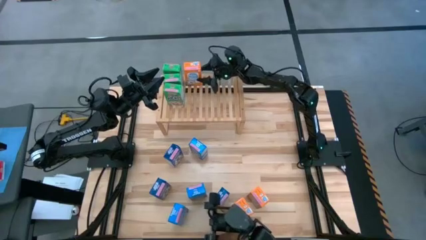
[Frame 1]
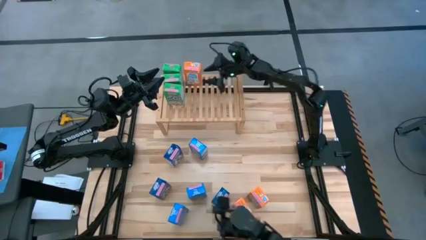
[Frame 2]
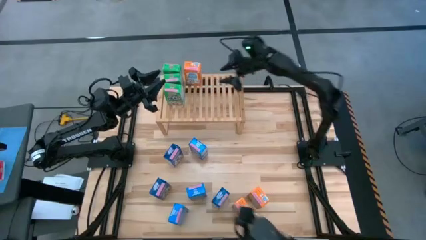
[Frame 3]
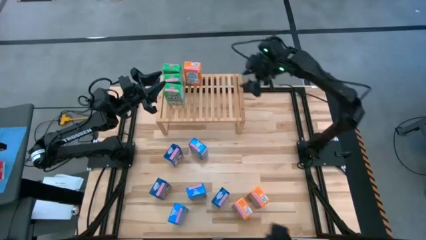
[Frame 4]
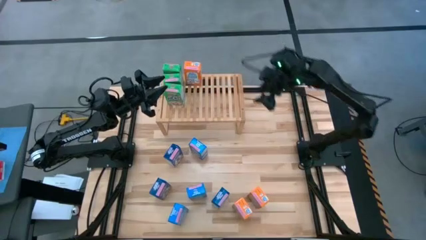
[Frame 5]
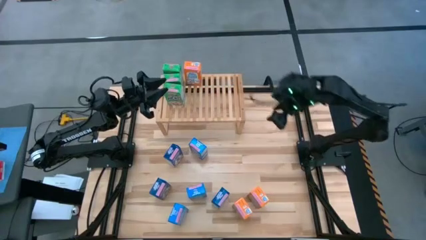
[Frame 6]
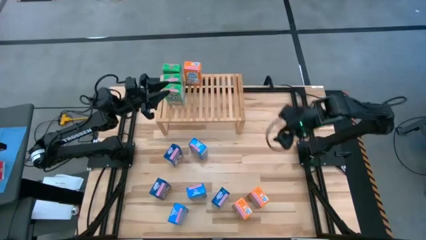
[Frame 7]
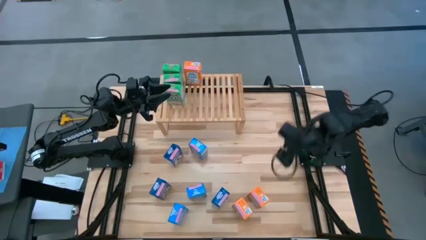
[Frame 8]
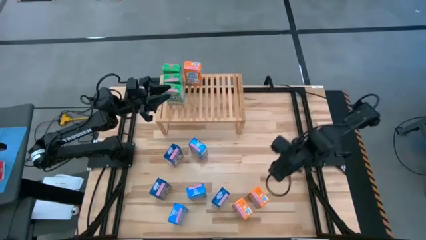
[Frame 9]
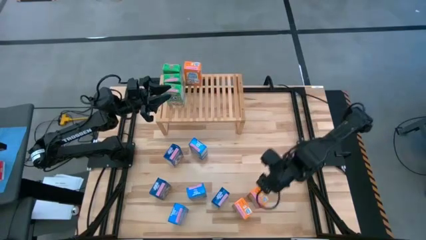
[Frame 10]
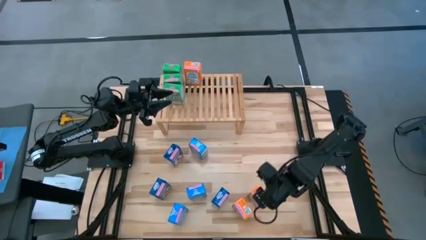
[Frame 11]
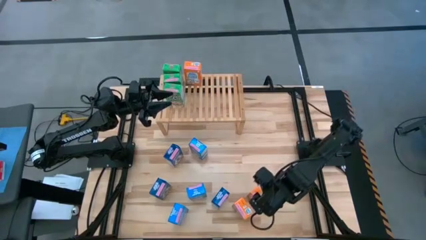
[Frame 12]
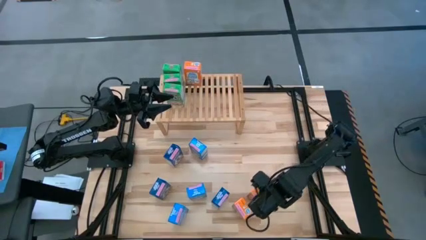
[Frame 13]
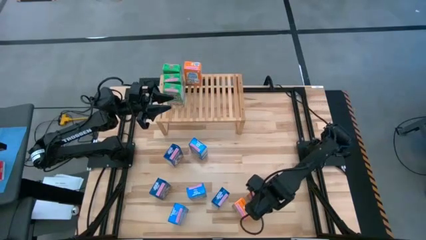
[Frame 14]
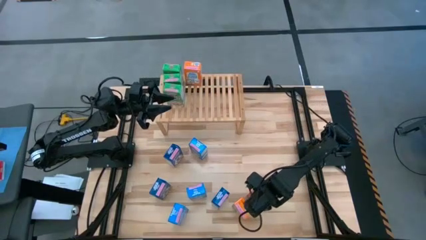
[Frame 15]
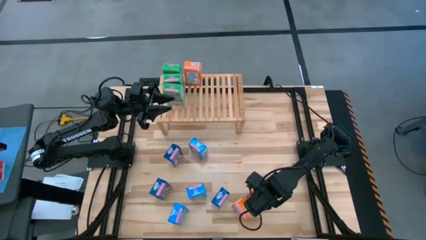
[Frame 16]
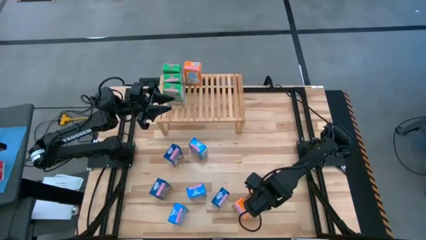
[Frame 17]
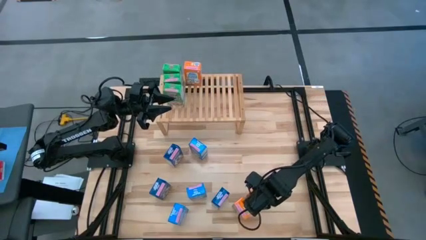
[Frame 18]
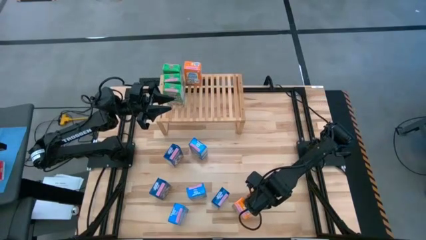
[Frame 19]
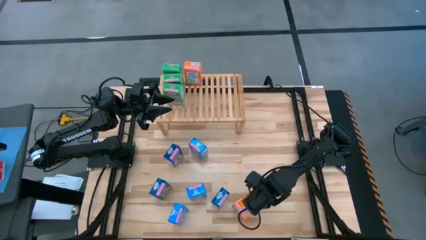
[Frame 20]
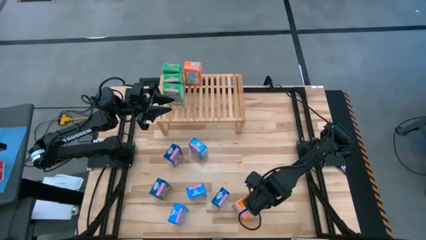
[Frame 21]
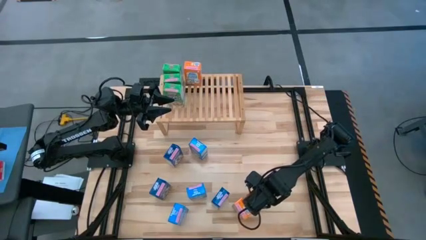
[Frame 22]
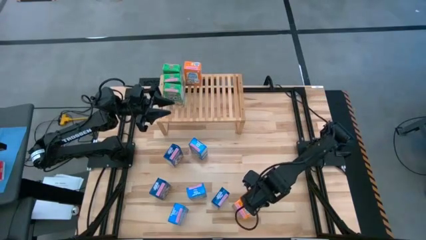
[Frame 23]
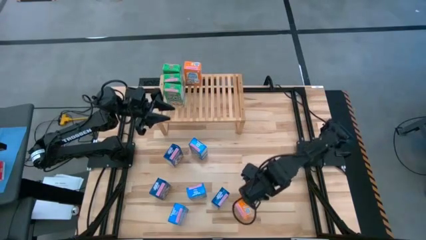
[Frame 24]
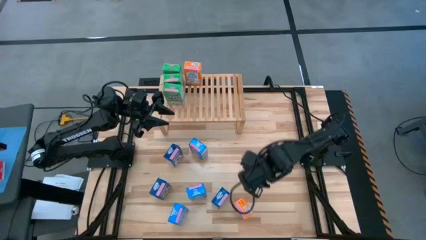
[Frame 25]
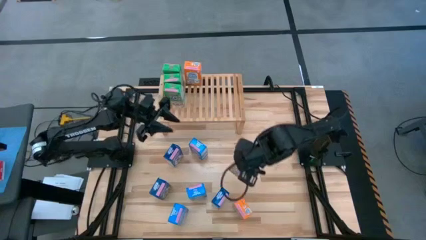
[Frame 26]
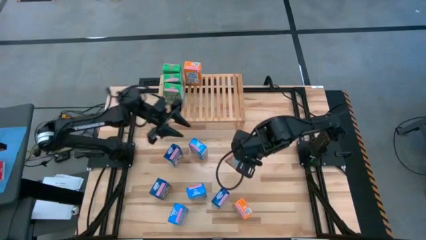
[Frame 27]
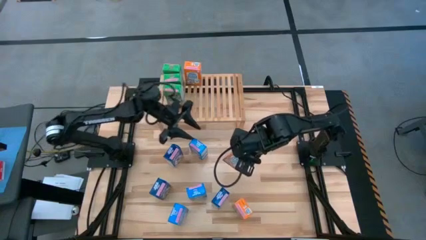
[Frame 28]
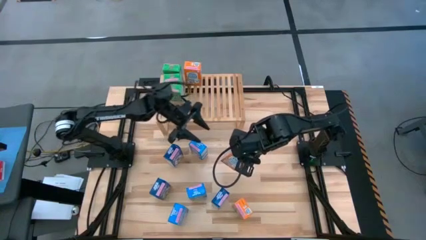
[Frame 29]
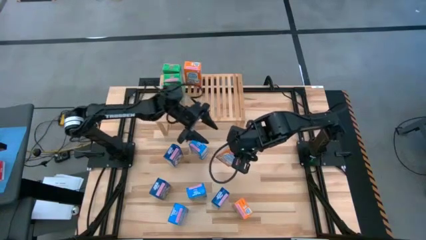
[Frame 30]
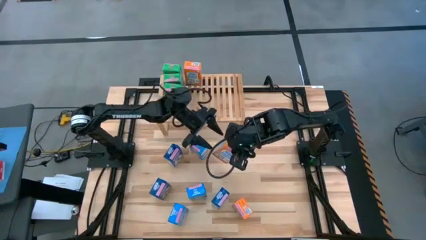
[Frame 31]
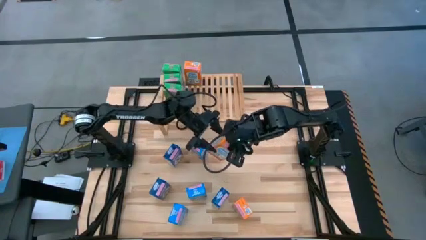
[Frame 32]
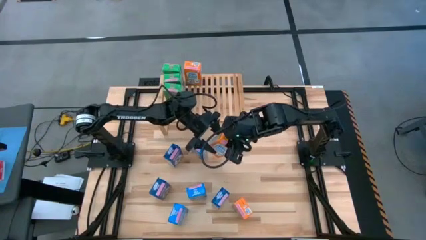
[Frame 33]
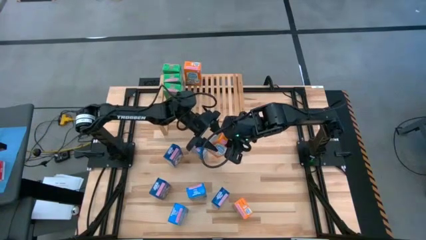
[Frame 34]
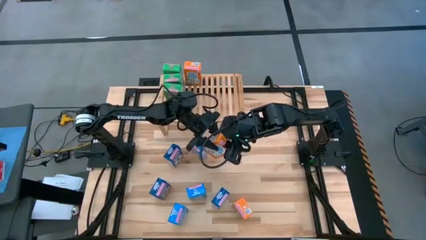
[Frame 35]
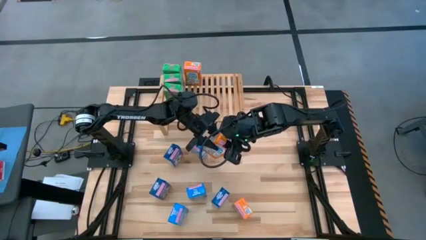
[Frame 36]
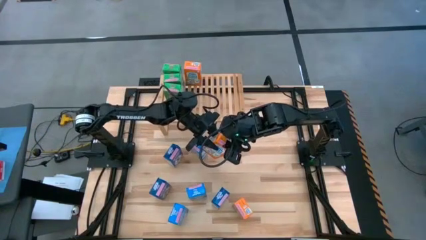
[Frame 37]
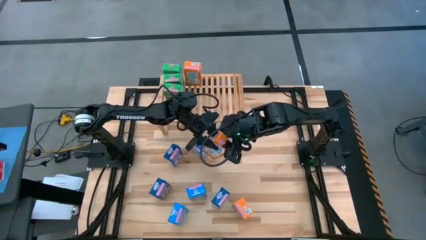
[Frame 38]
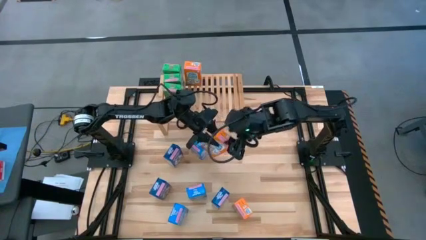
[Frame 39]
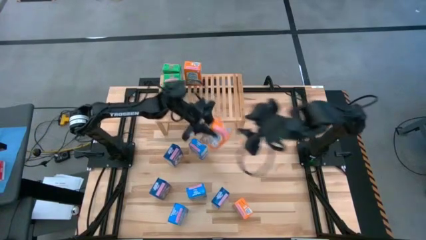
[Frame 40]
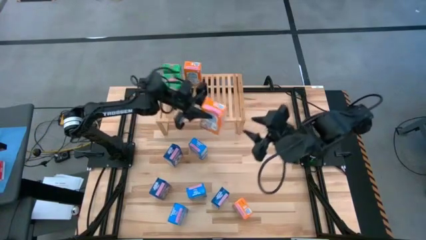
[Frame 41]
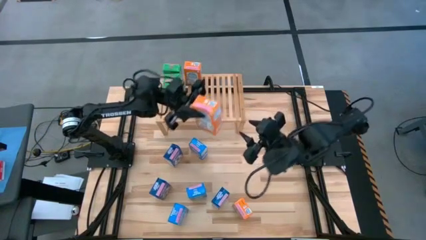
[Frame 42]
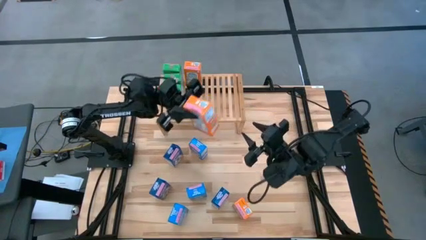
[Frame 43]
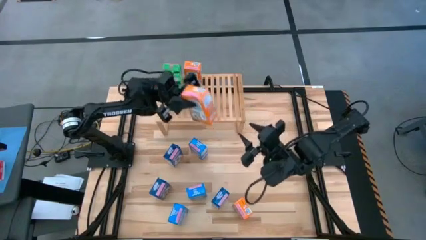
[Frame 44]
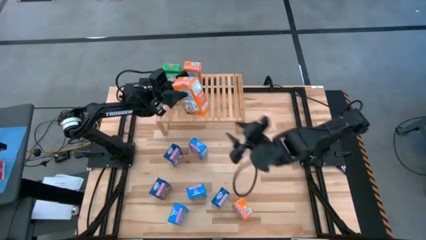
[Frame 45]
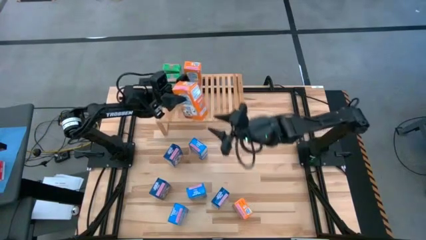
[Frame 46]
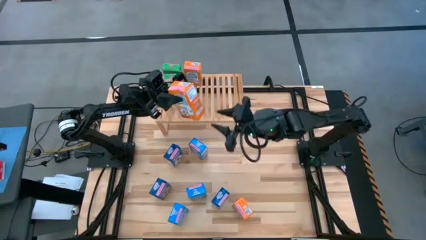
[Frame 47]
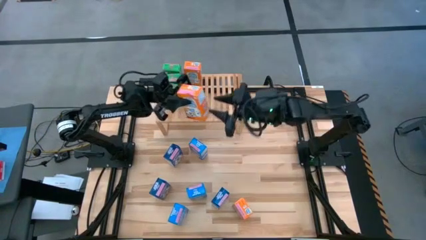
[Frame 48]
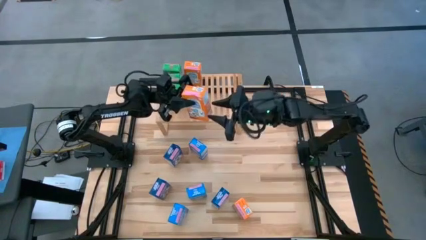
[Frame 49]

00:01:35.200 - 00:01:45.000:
Task: Stack cereal on shelf
Put the right orange cereal box on the shelf aligned with the other orange cereal box

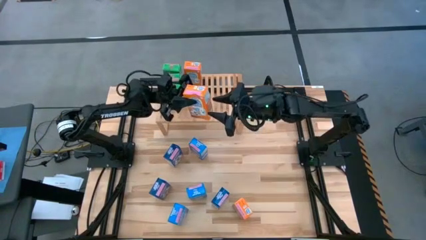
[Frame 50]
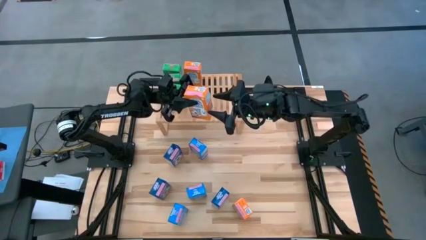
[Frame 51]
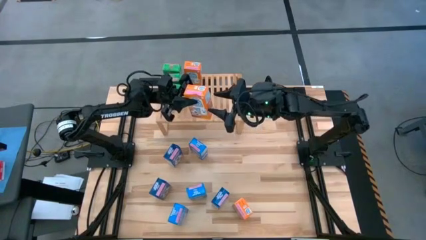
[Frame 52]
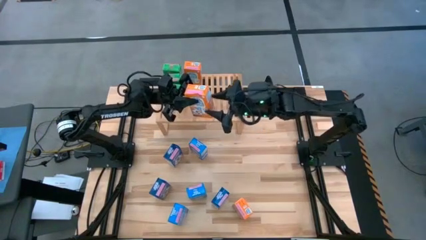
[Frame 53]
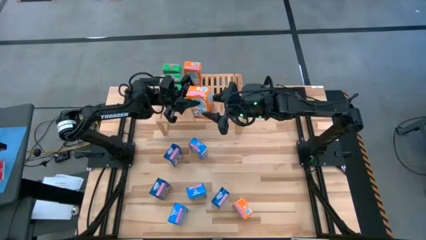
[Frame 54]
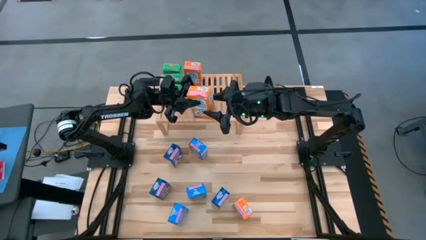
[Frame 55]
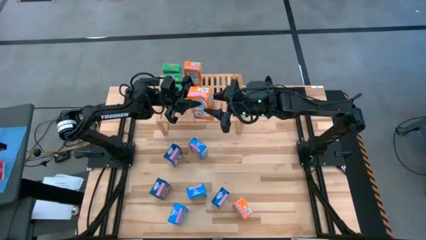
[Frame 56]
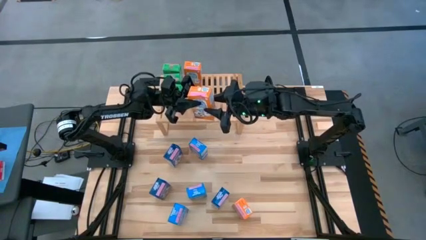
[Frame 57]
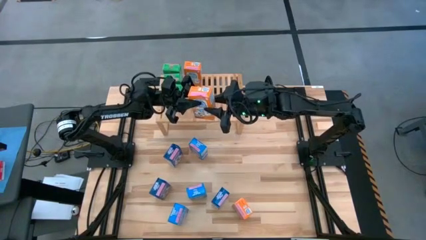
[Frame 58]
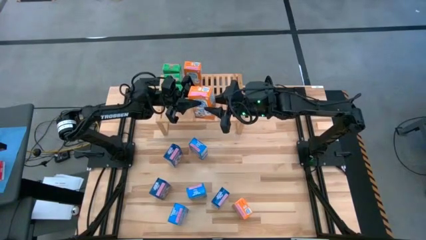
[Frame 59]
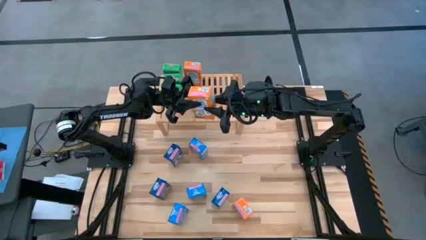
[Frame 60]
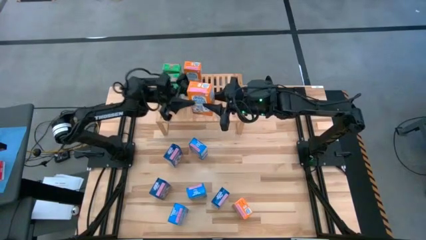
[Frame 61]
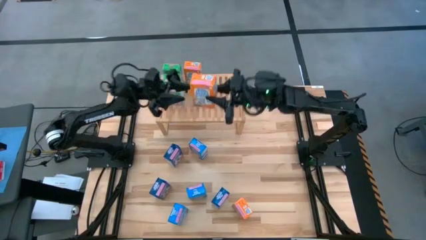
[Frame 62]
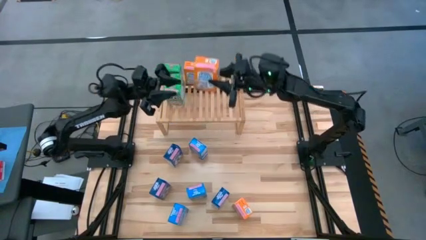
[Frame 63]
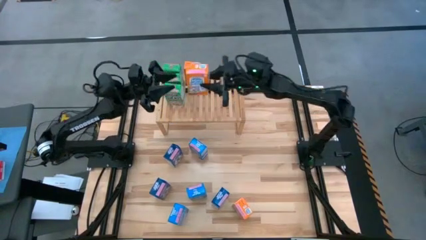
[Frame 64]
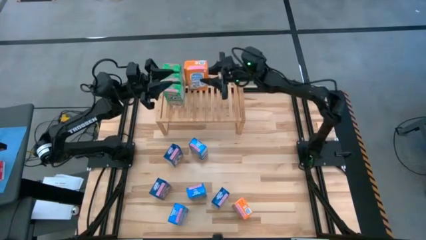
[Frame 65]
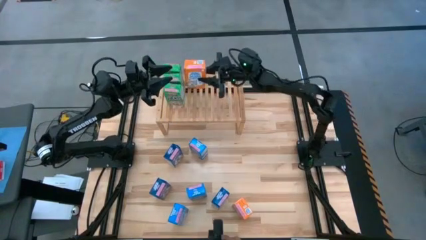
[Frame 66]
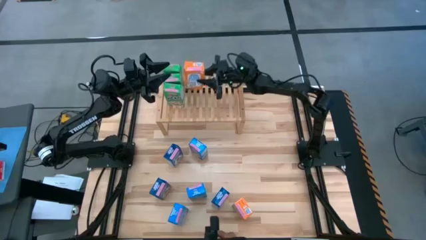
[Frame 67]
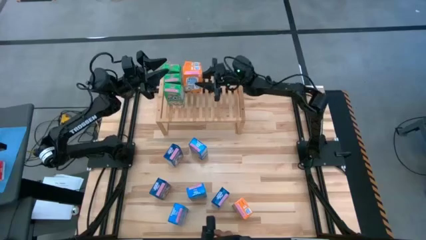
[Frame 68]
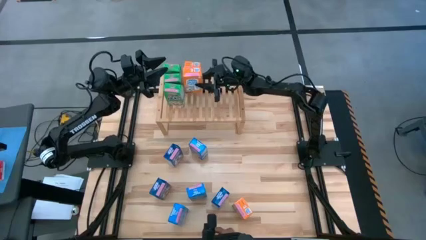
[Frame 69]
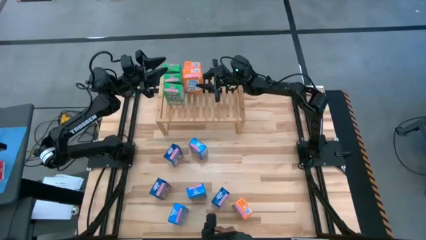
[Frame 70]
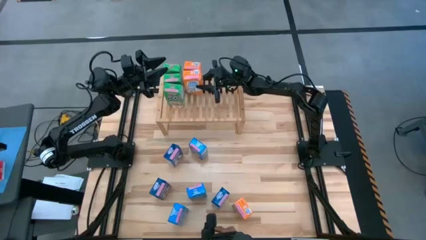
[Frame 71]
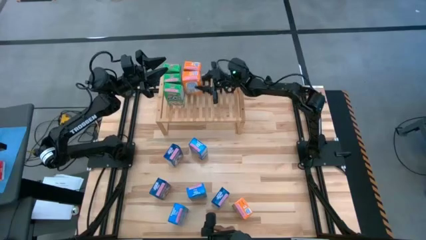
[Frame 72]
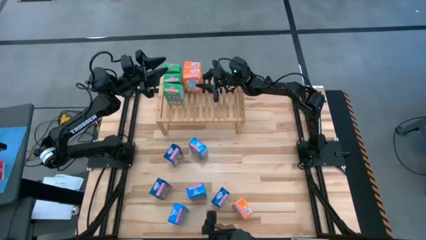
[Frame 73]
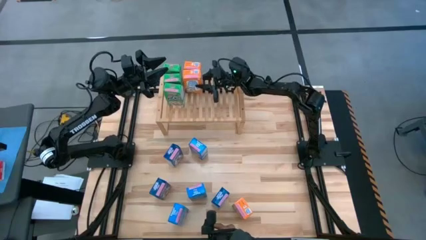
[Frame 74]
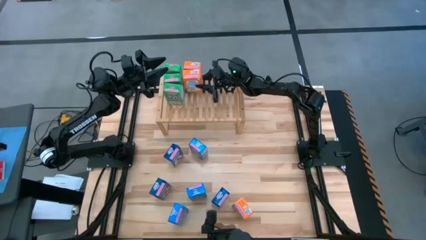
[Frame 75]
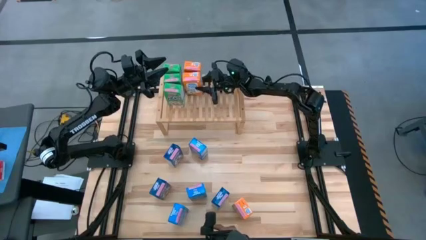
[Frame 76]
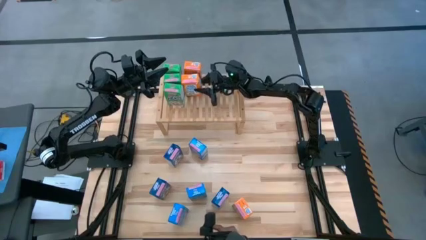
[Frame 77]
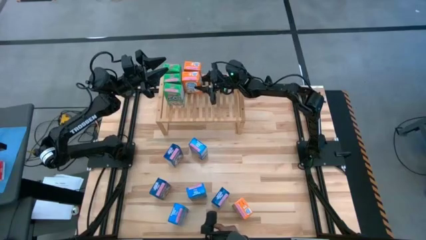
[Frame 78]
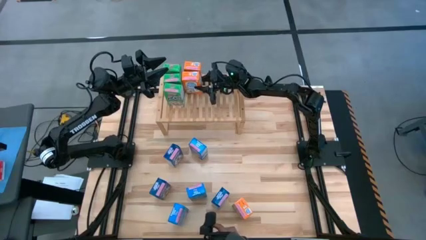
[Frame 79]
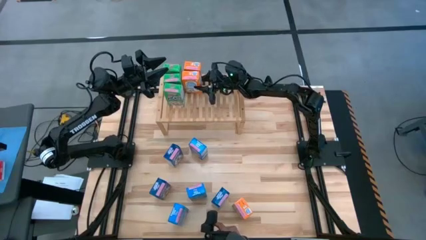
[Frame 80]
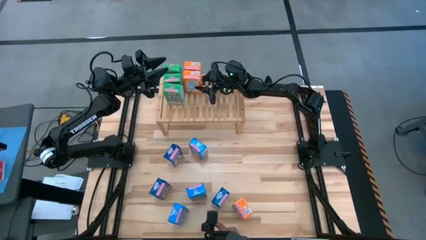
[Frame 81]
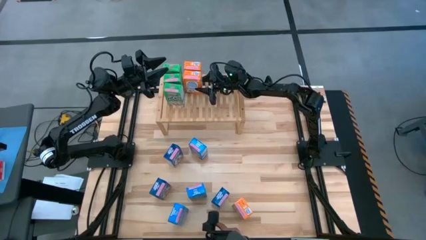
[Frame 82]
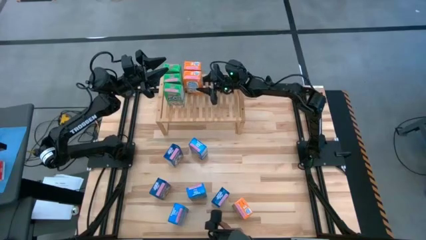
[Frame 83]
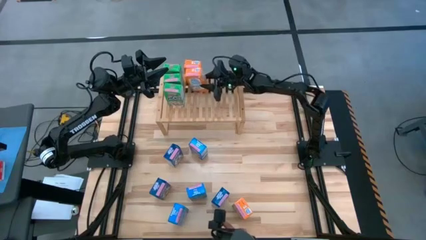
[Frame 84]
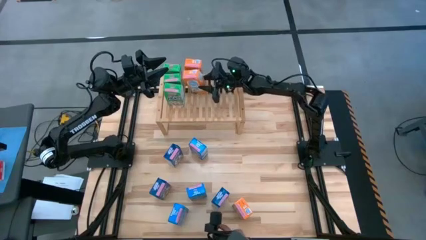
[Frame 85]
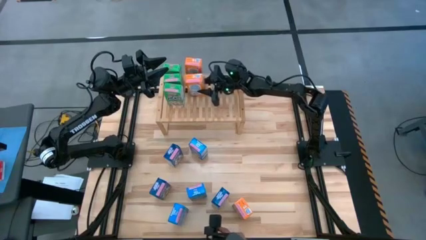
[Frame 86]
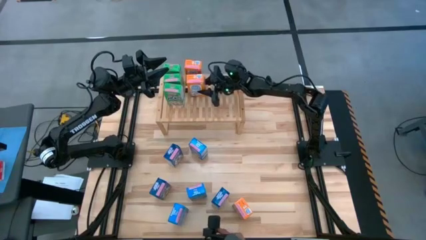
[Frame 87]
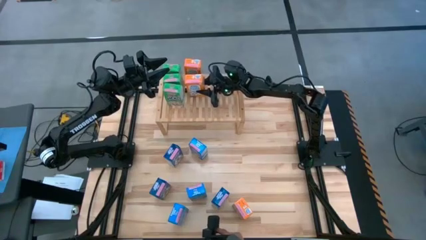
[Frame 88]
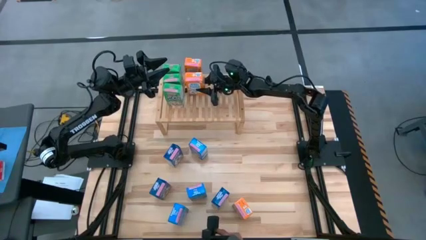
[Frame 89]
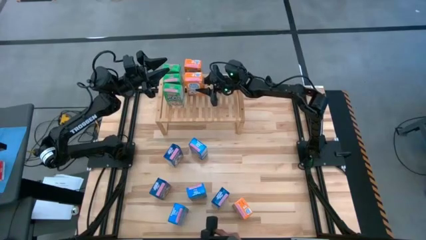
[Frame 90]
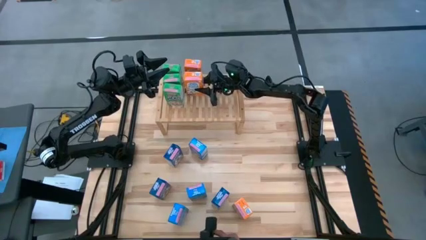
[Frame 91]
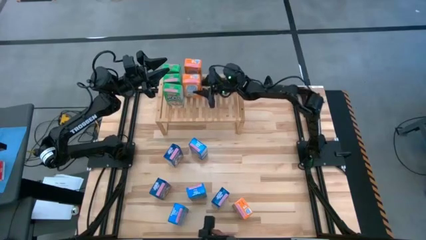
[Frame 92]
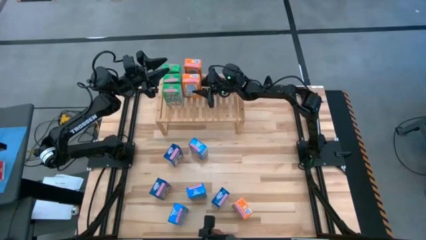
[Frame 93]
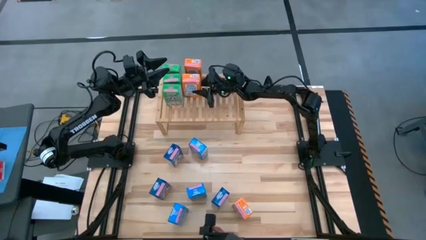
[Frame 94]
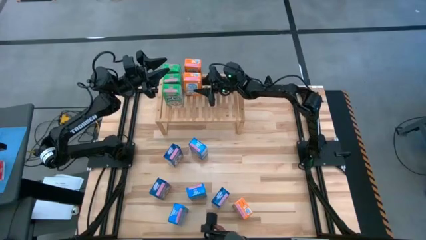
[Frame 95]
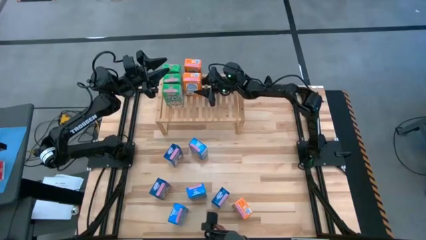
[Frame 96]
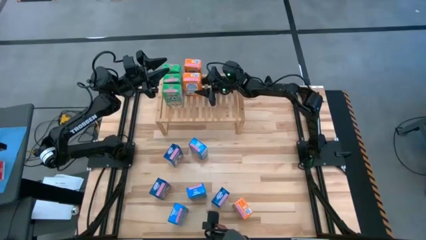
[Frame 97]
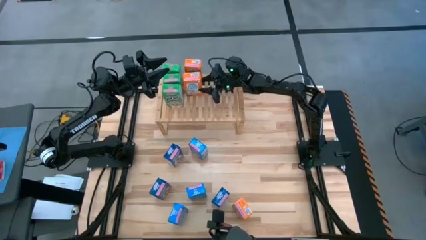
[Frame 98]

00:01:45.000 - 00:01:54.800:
Put the right orange cereal box on the shelf aligned with the other orange cereal box
